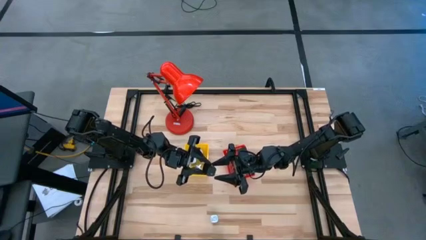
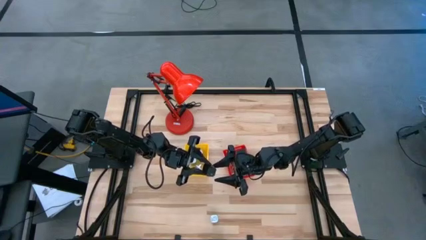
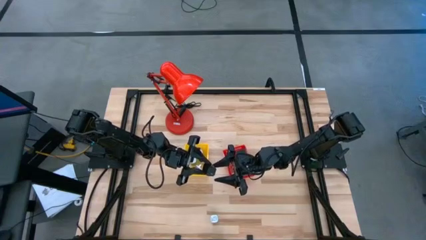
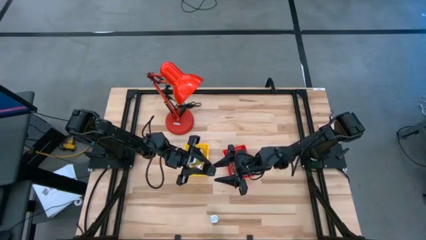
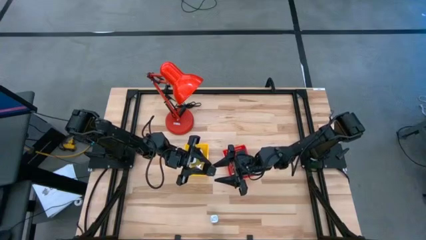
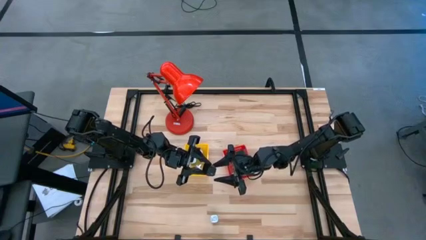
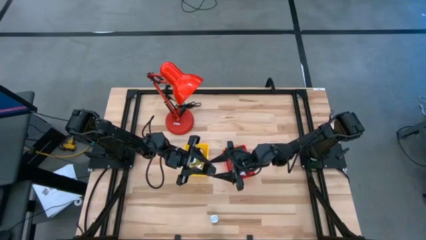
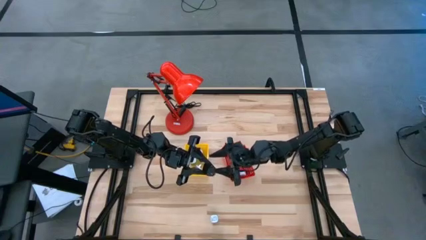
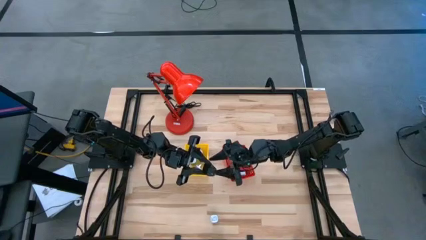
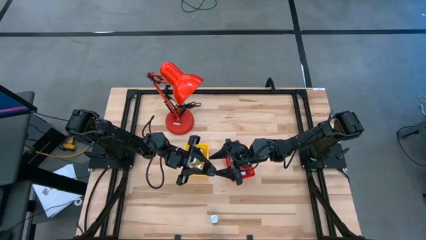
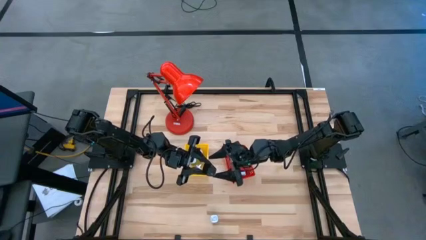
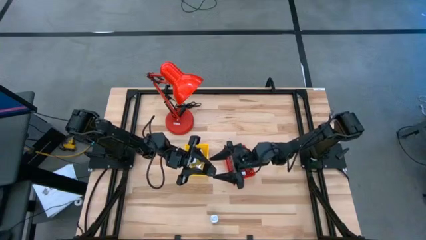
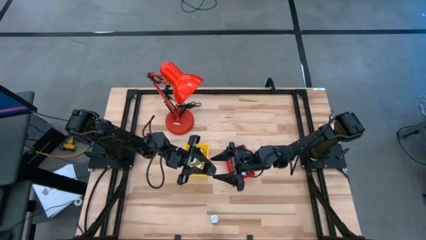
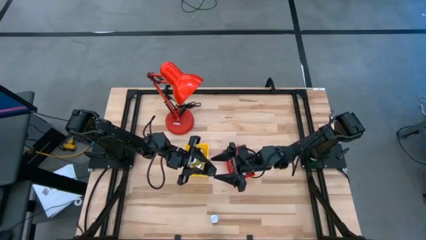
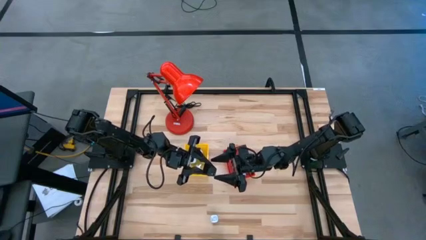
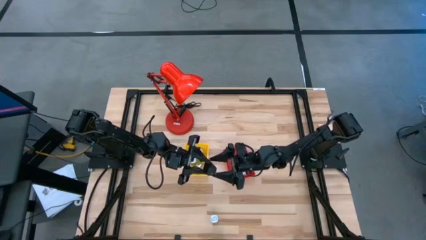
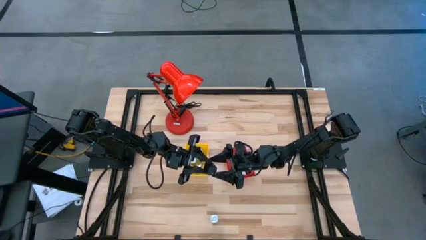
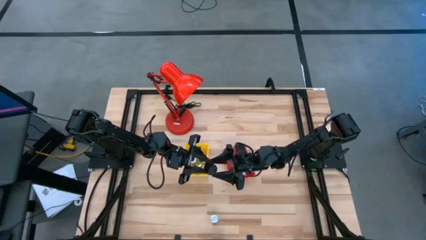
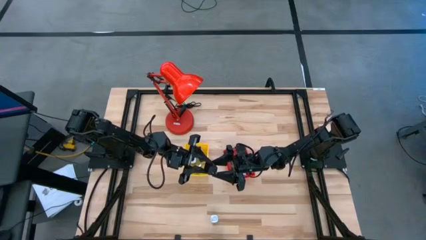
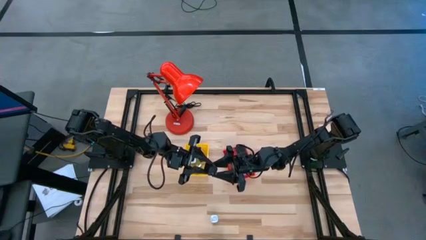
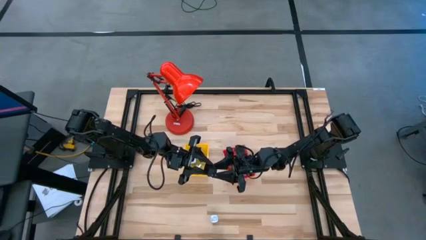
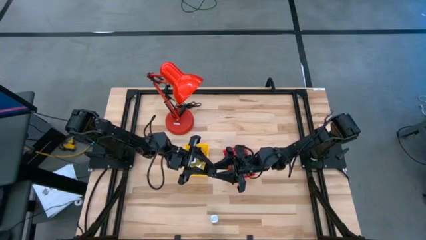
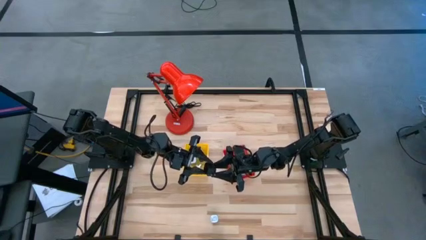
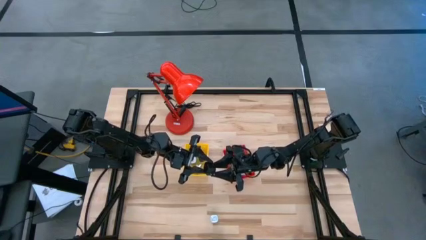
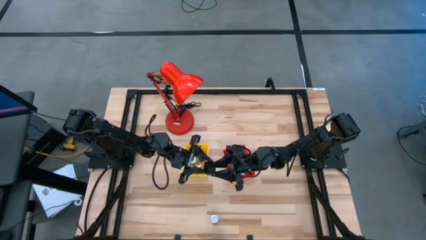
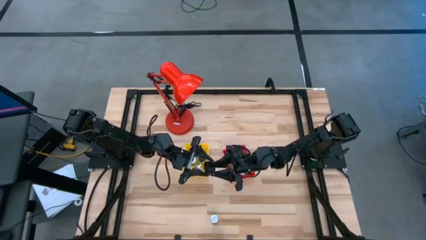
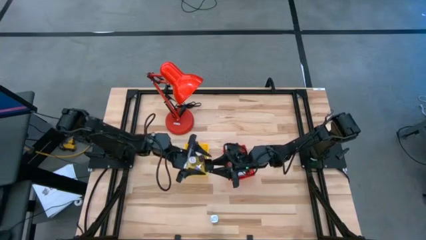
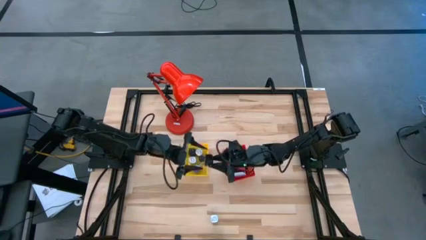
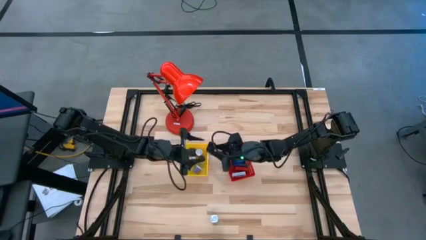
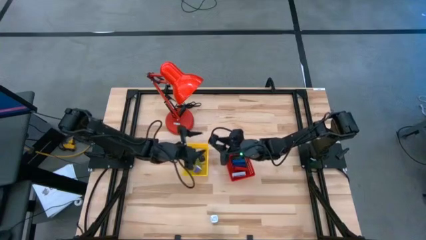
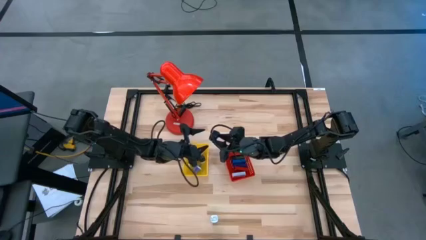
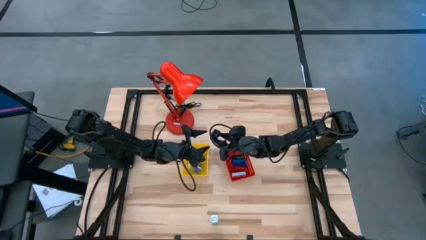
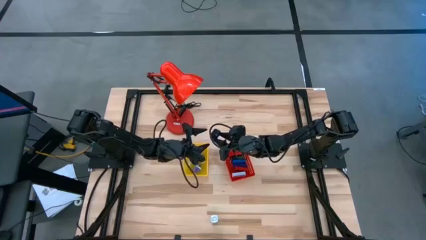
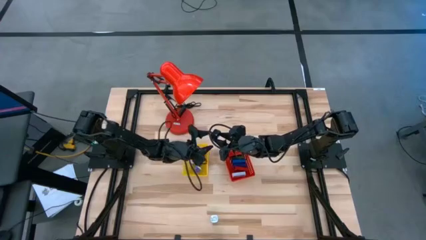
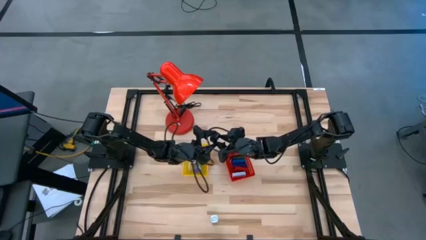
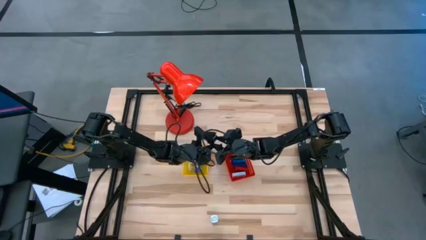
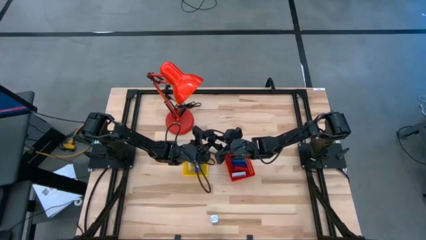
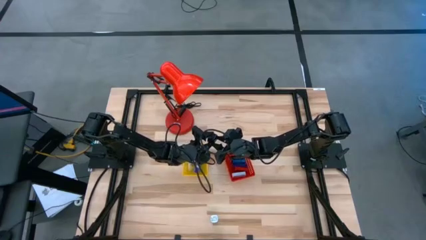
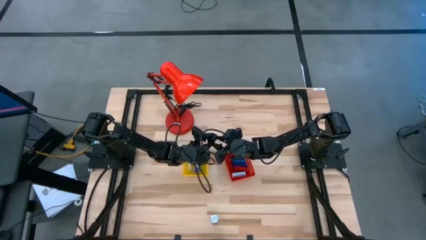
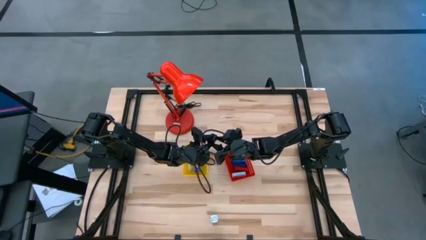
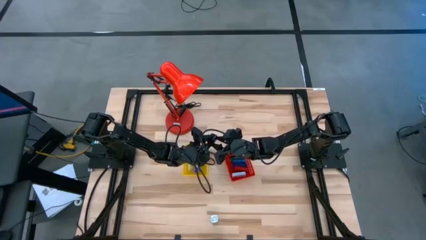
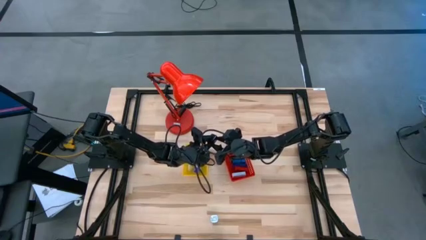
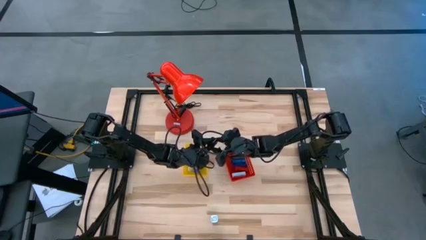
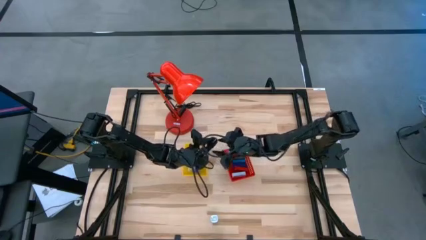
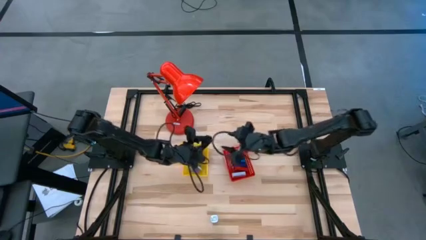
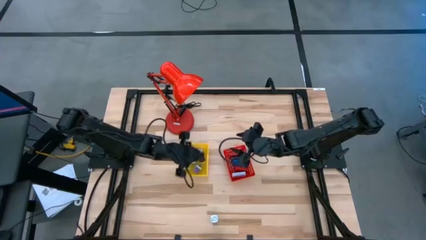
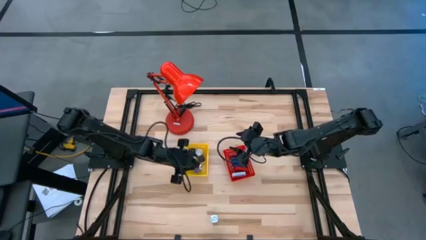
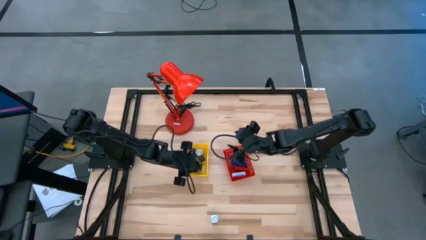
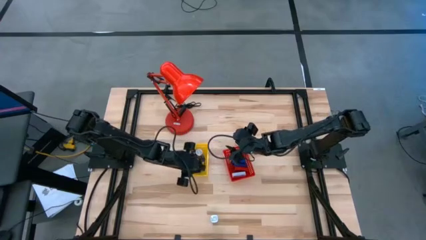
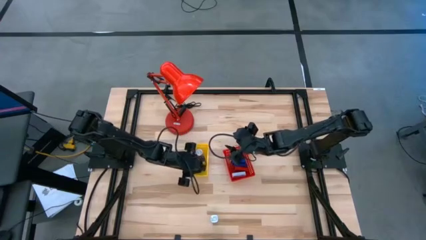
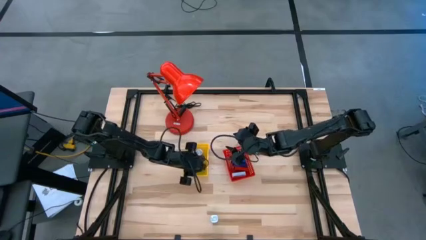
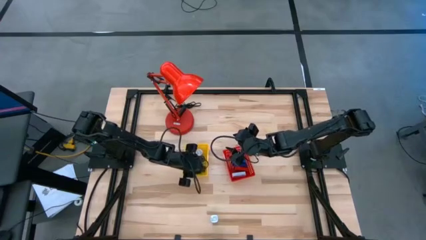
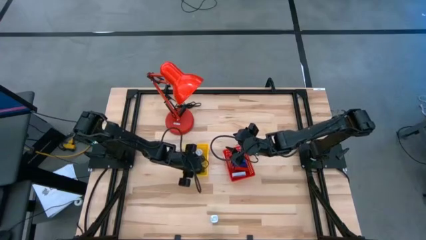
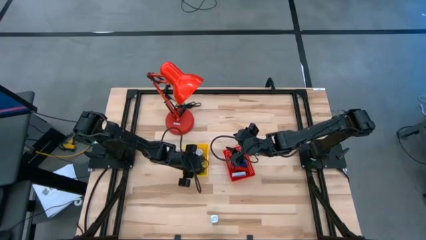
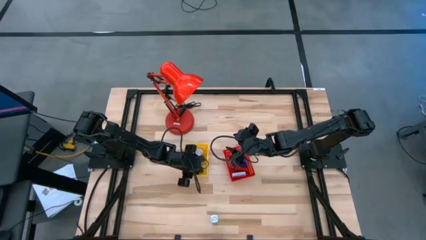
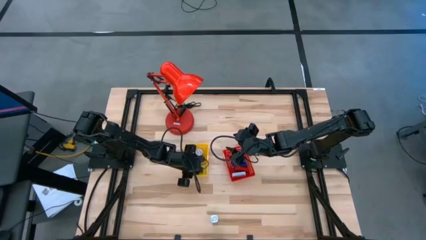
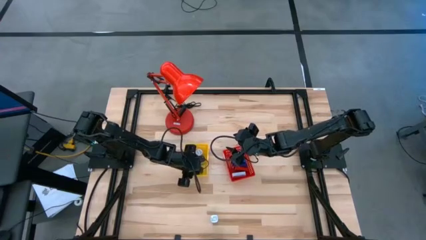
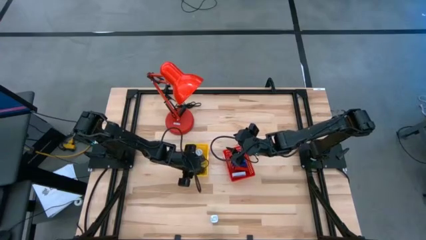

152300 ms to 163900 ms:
Task: Pick & Place Office items
Put the black charger adapter into the yellow bin

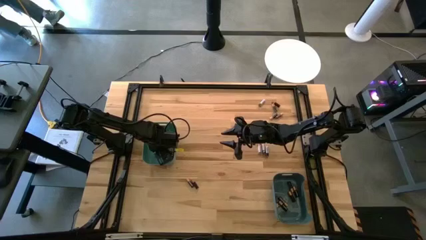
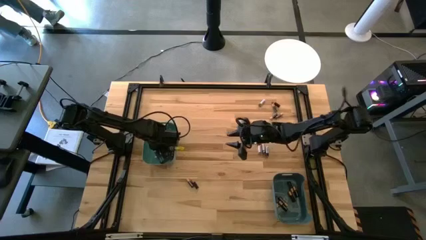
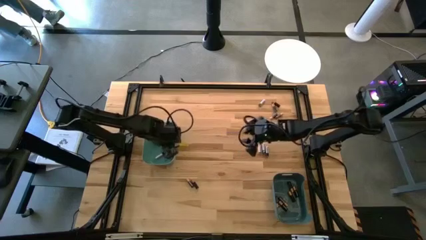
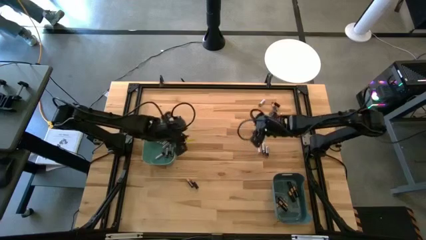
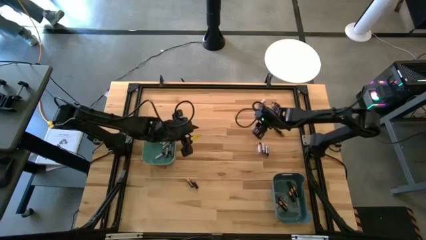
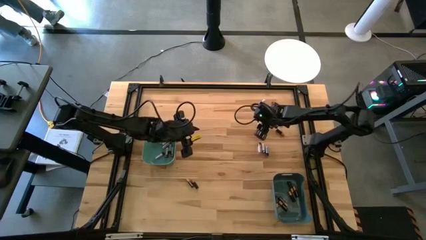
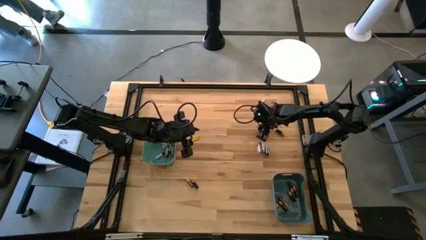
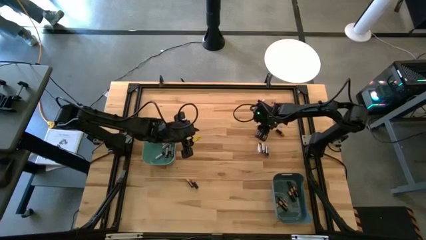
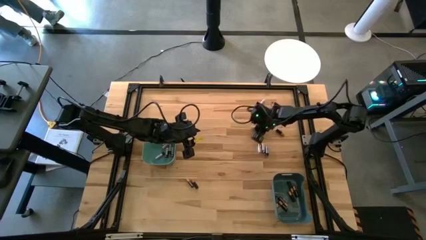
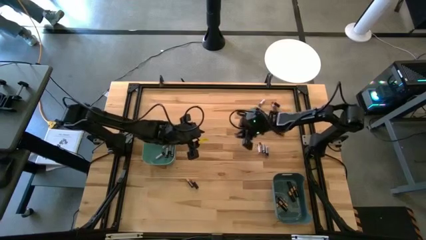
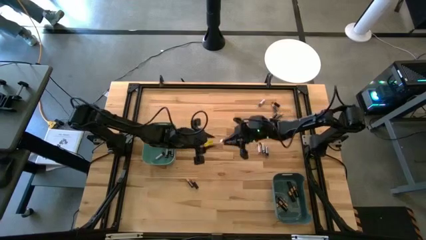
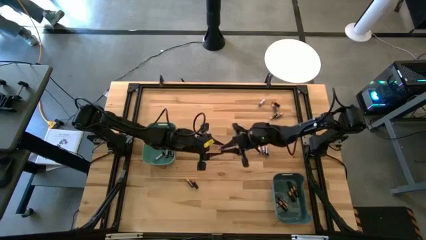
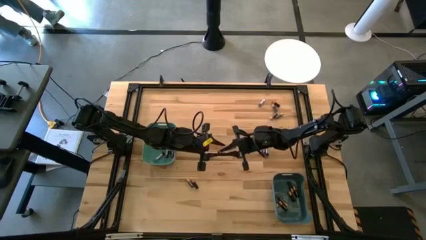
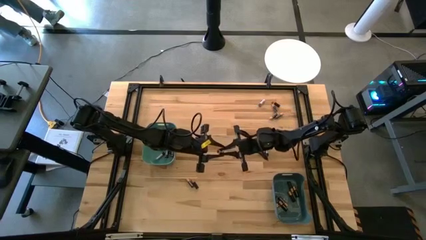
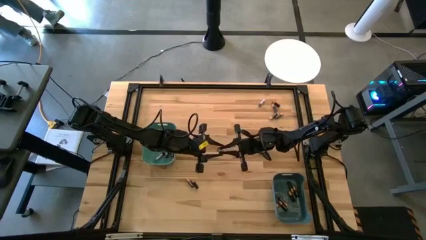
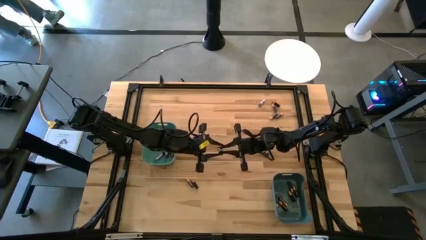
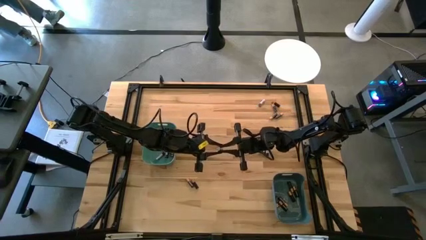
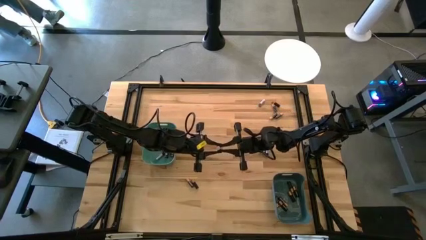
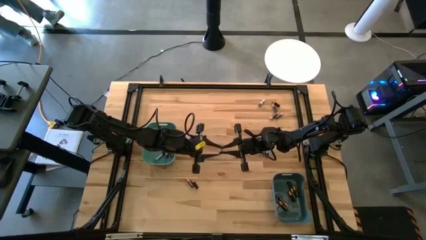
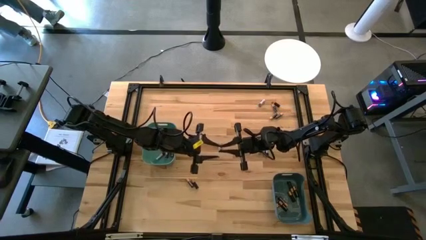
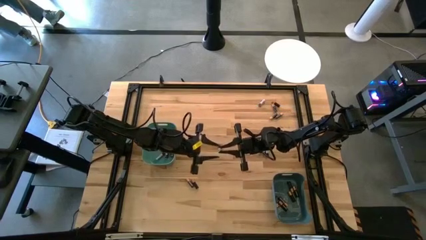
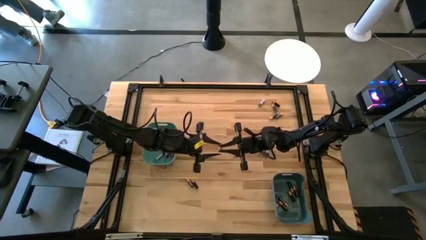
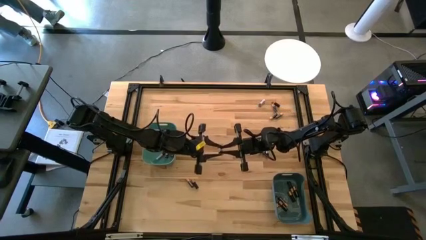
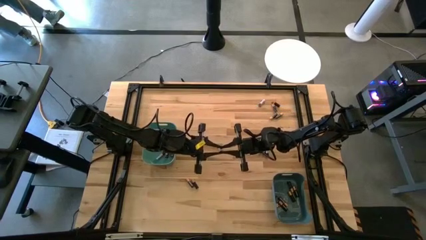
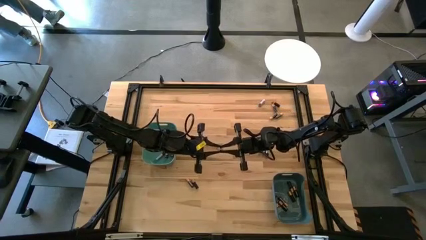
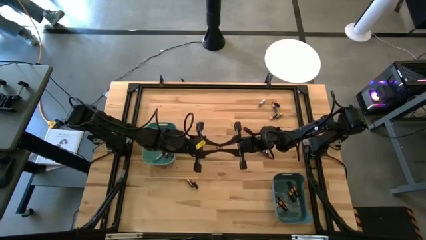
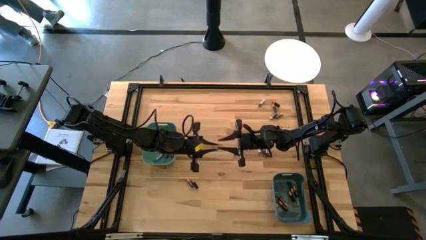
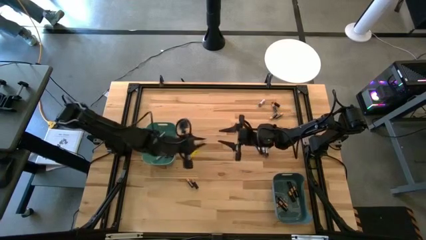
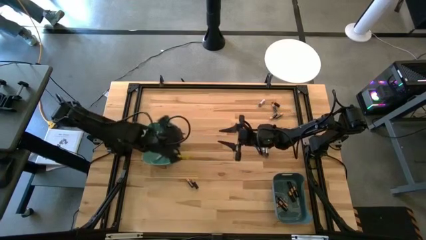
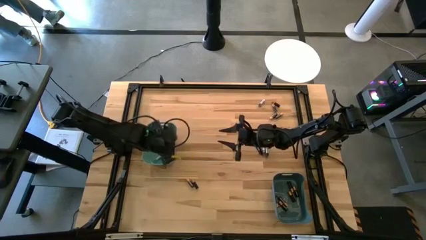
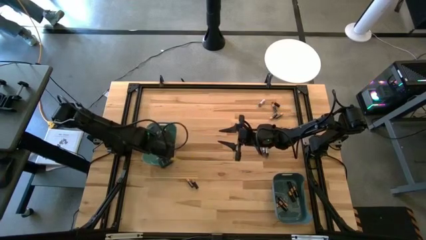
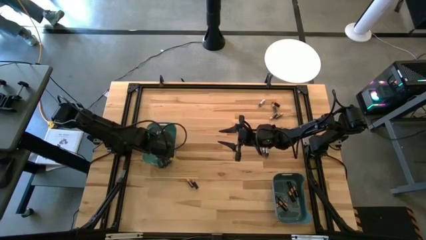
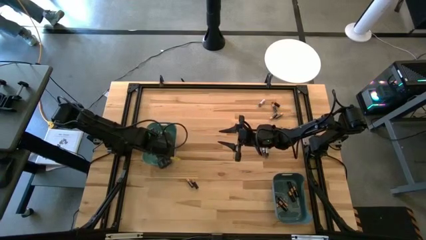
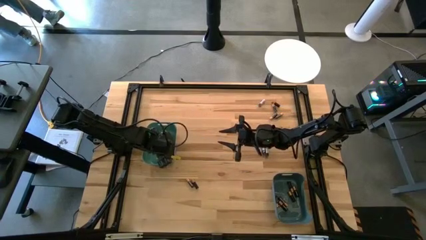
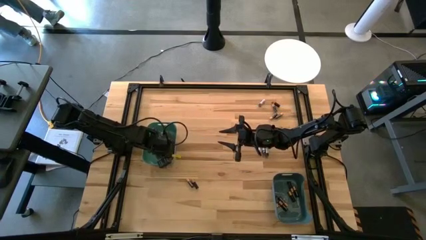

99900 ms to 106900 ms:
Task: Sort batteries
Put the silver battery into the green bin
